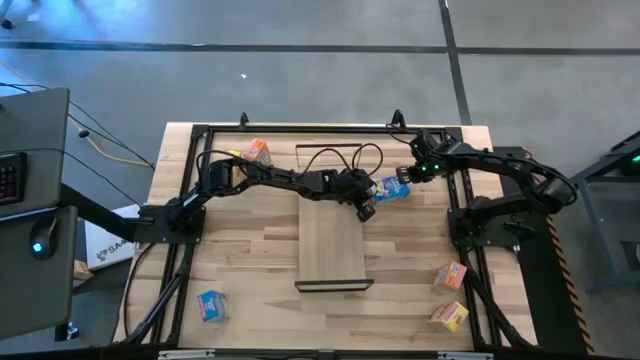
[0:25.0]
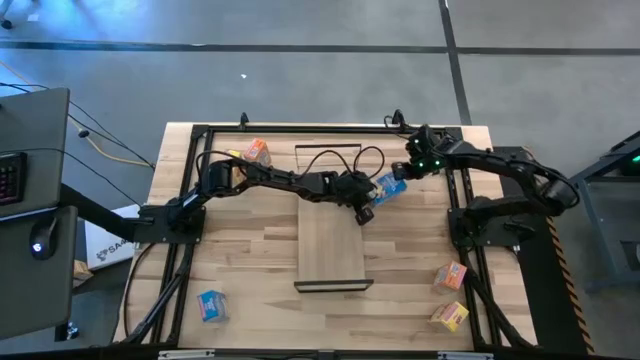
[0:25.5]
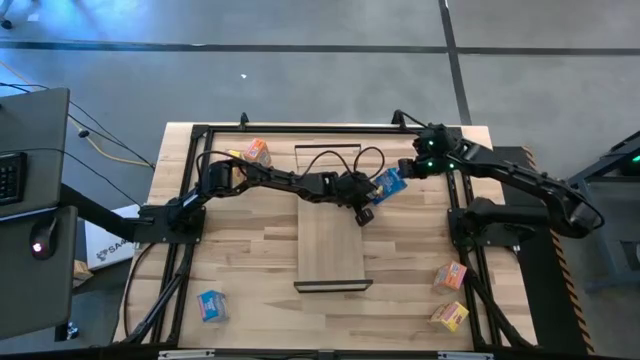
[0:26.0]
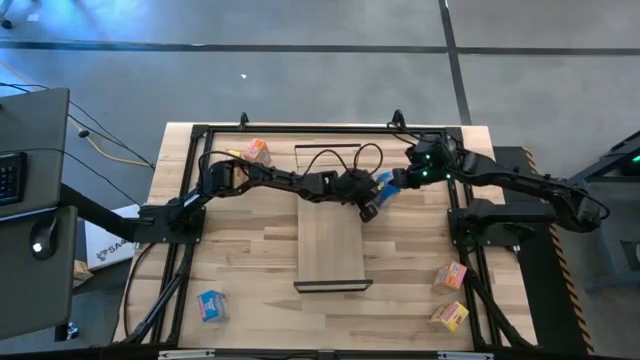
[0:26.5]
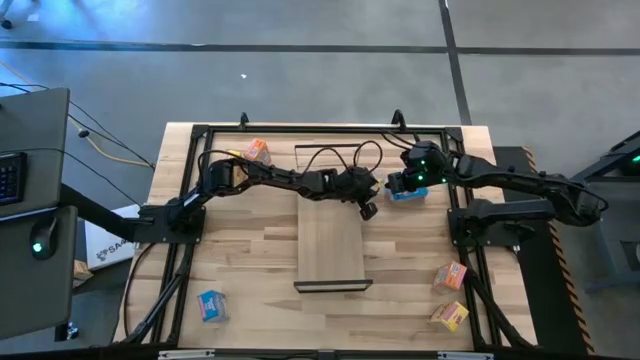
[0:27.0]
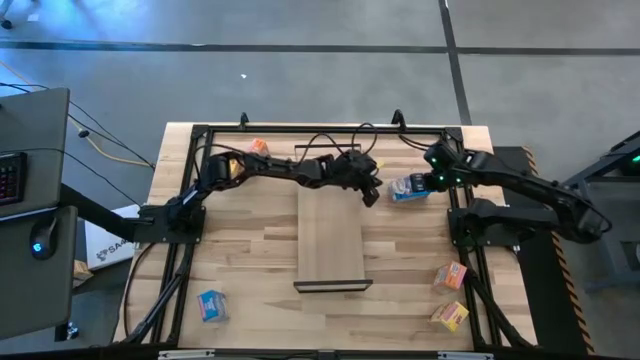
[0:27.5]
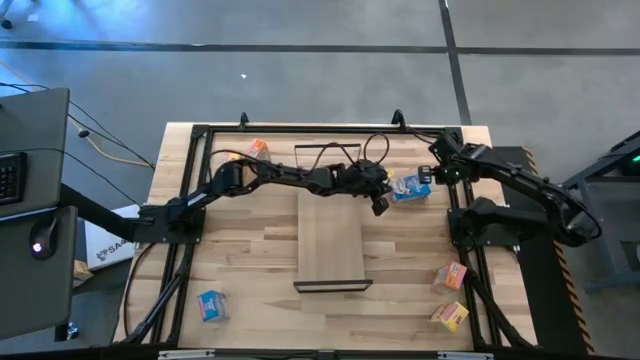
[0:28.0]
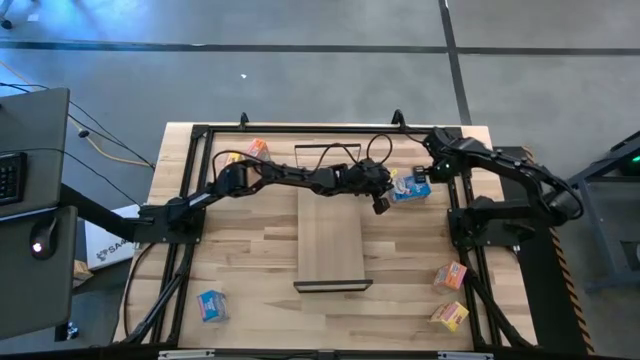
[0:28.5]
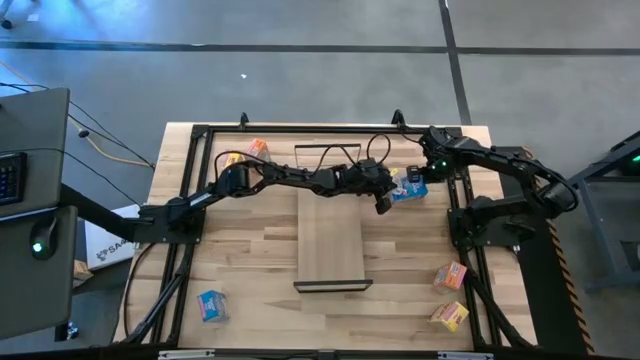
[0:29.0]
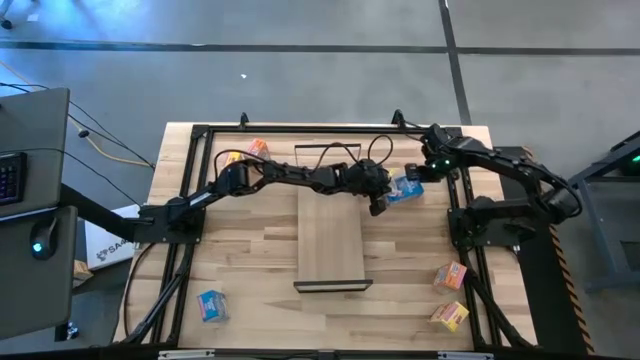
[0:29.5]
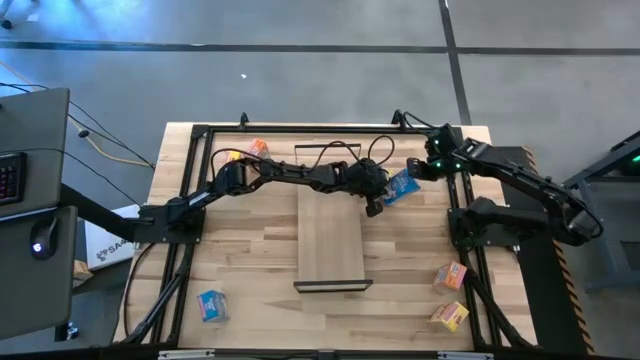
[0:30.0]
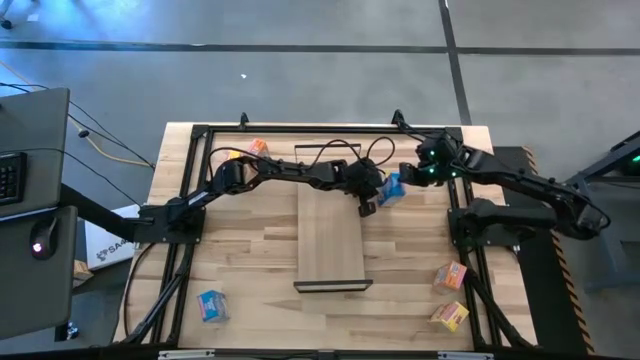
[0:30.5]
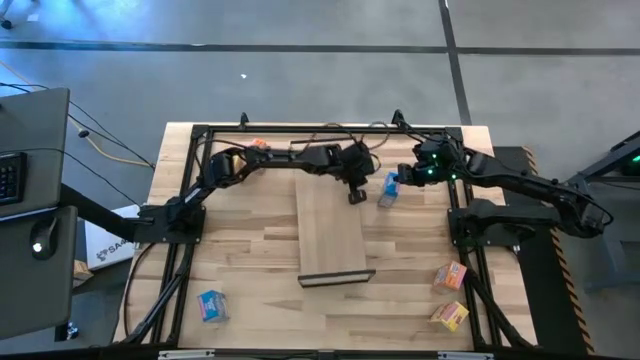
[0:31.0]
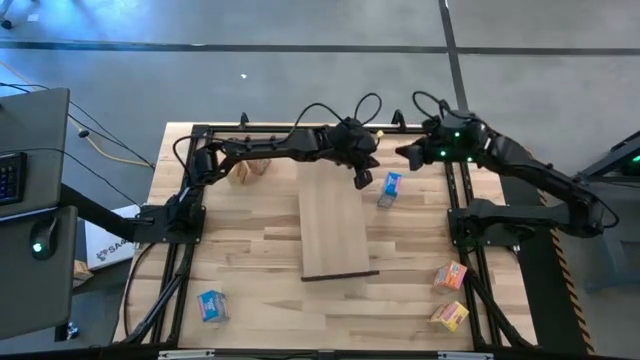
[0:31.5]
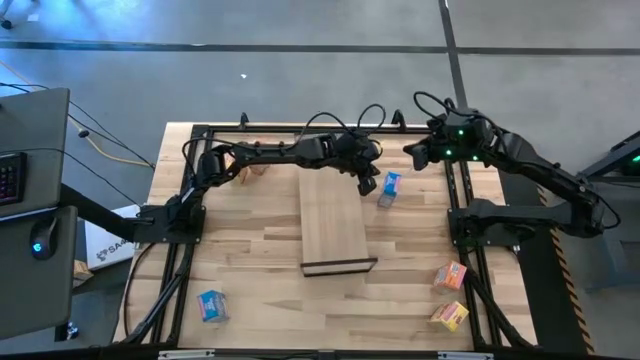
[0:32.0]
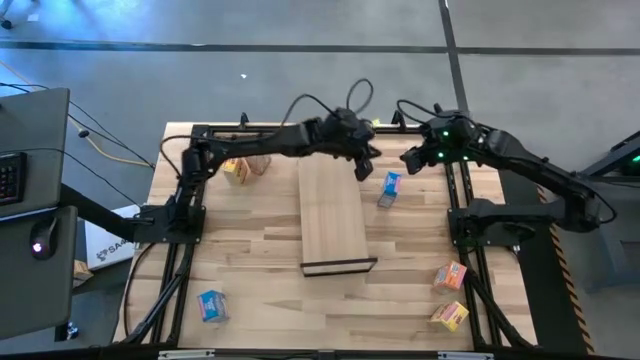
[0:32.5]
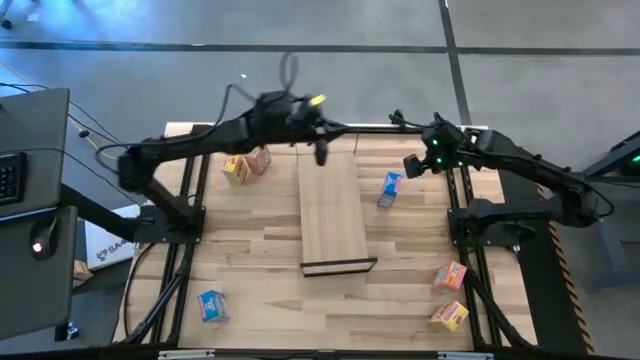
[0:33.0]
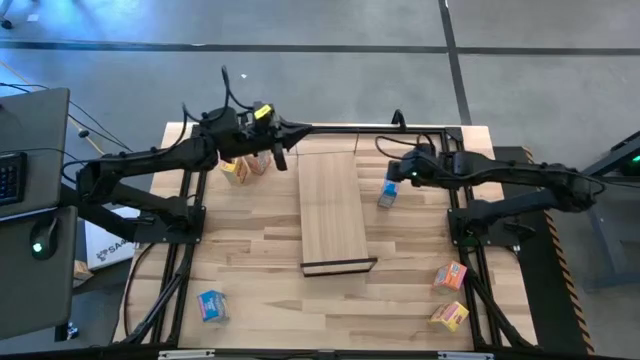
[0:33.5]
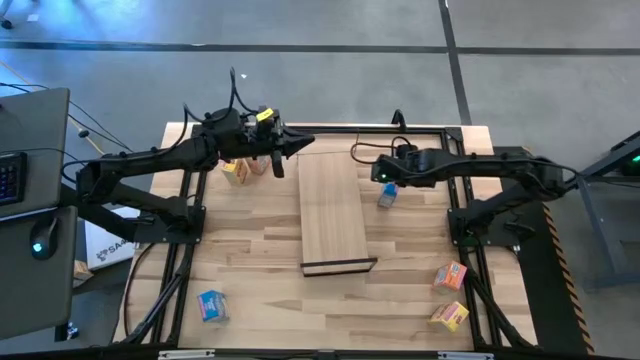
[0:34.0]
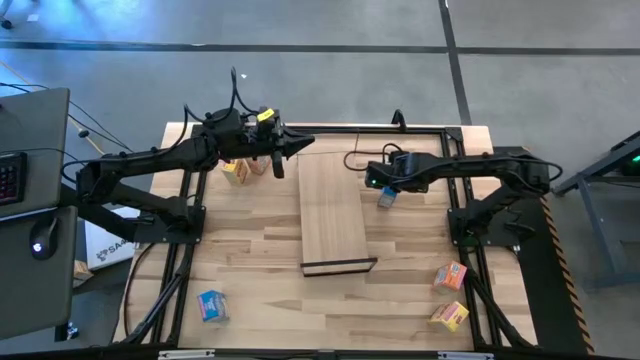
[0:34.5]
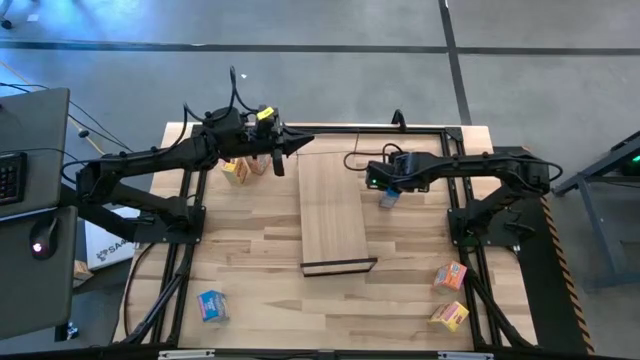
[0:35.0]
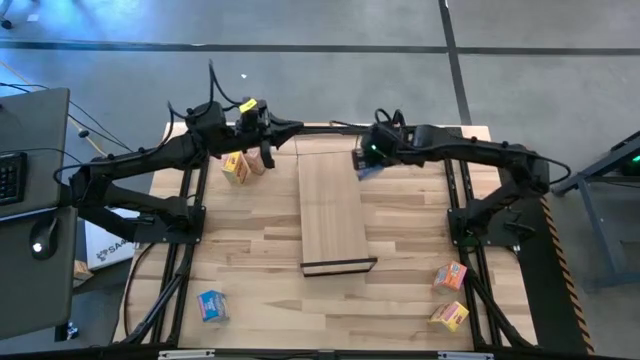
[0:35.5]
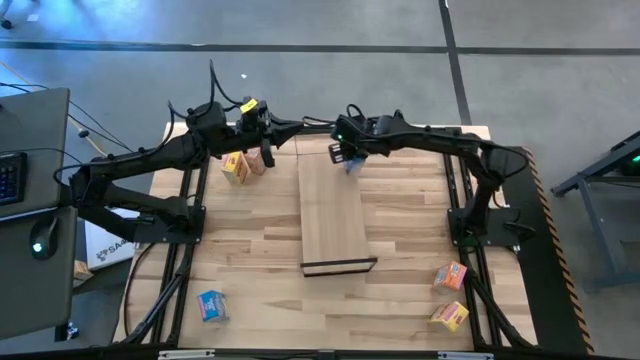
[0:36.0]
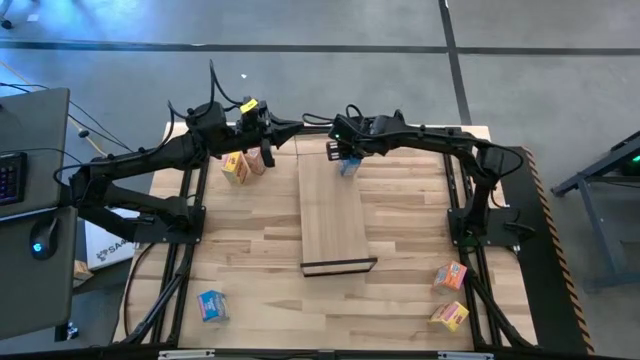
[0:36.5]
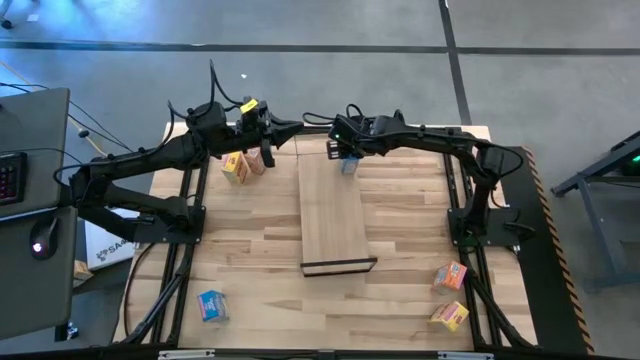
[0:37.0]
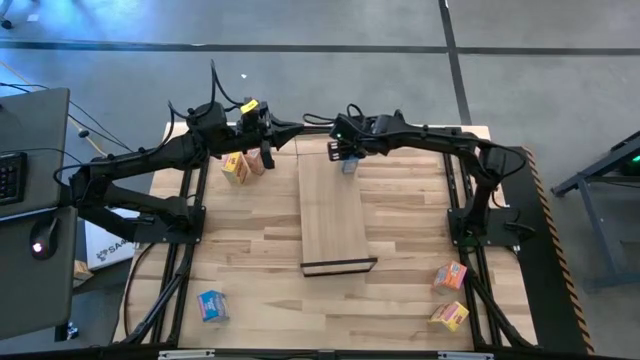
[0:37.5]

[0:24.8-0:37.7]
Task: Stack cereal on shelf
Put the top blue cereal box on the shelf
